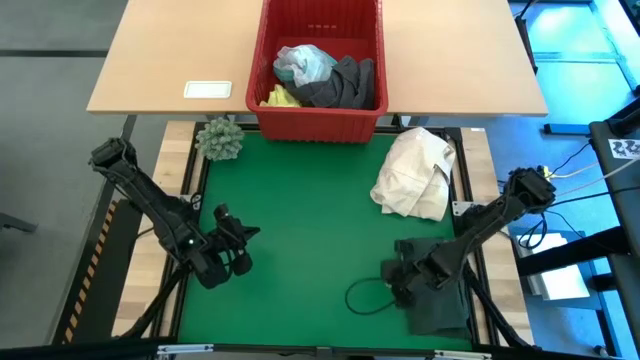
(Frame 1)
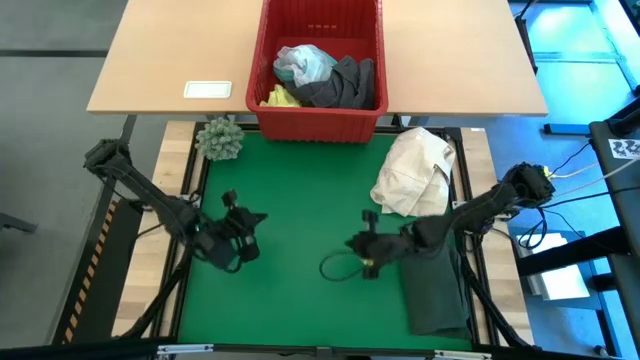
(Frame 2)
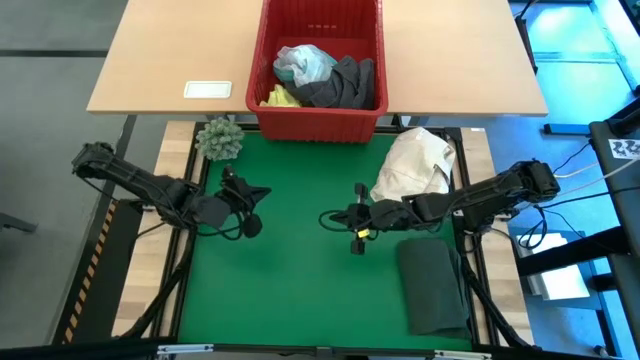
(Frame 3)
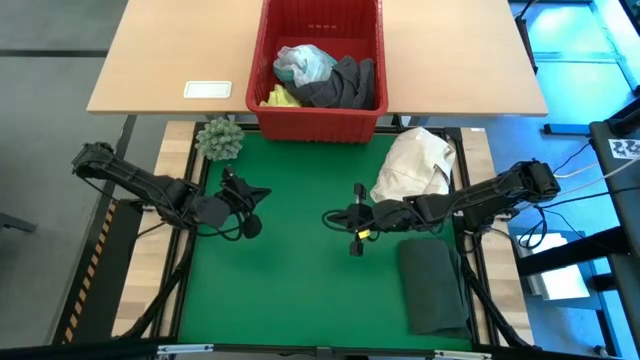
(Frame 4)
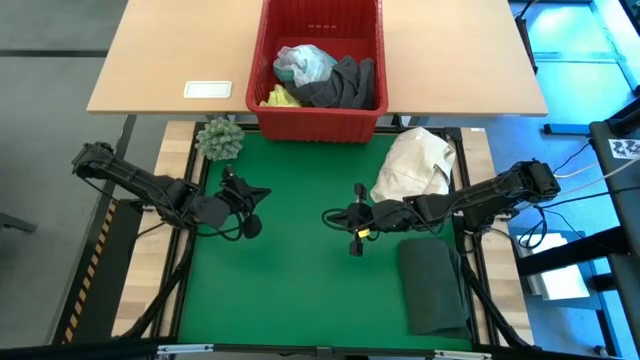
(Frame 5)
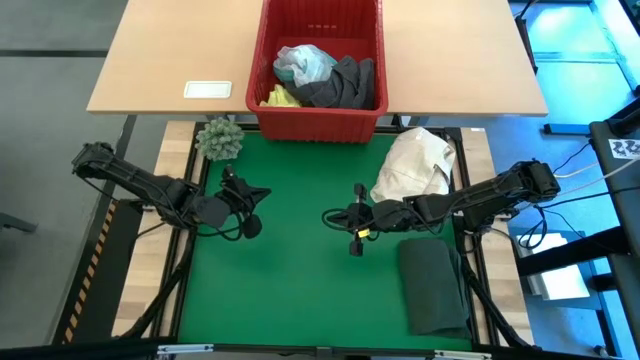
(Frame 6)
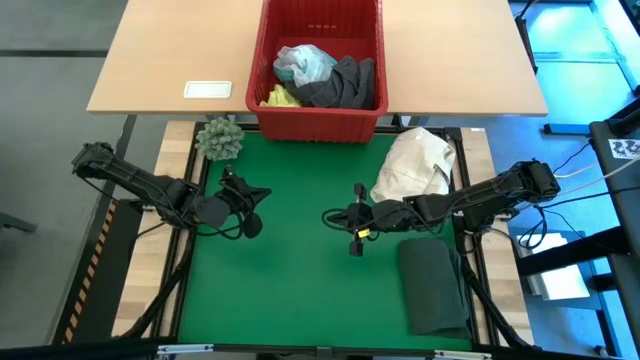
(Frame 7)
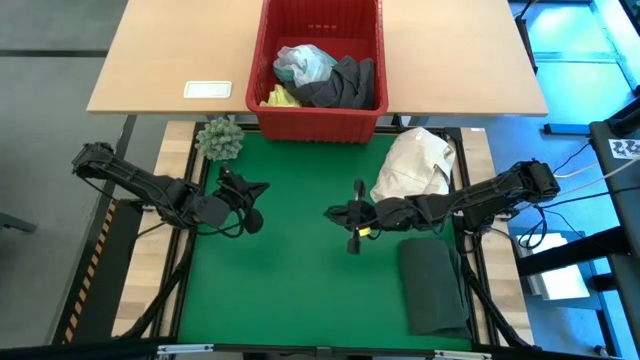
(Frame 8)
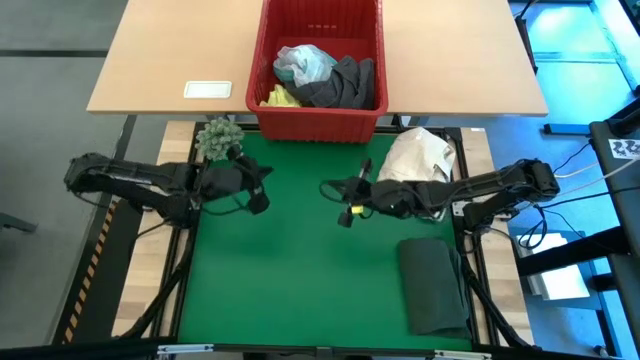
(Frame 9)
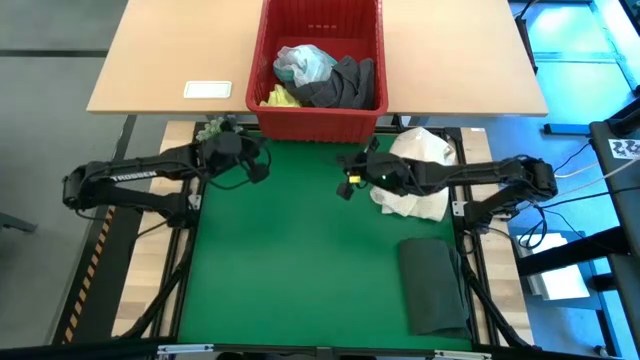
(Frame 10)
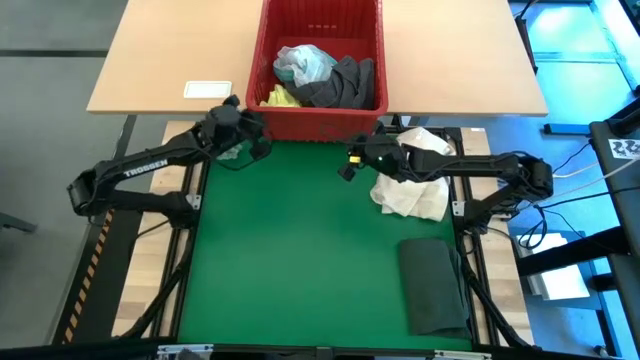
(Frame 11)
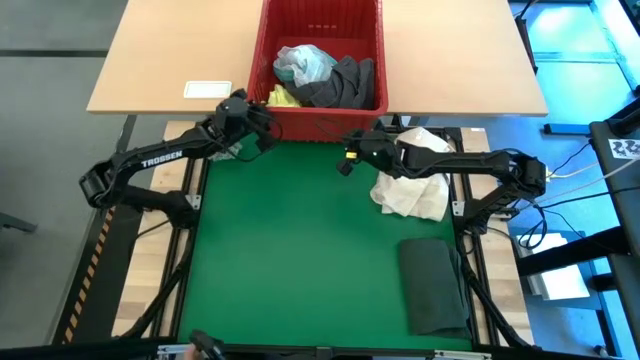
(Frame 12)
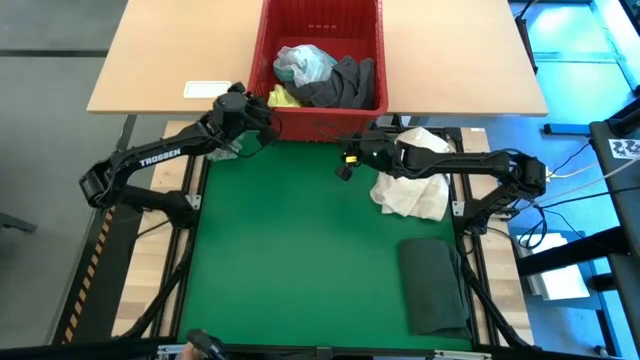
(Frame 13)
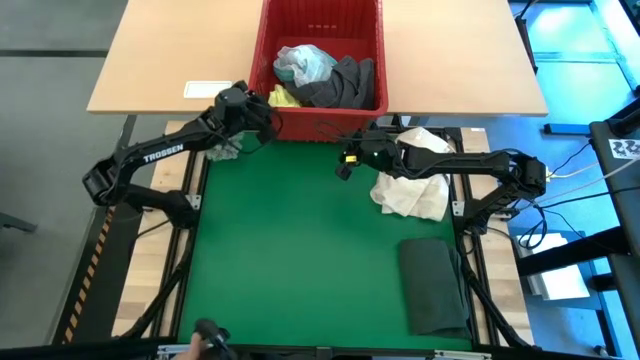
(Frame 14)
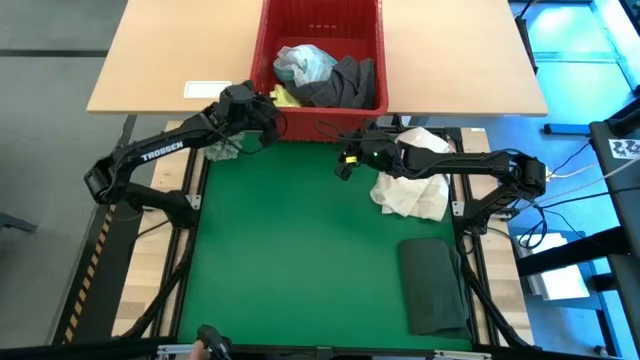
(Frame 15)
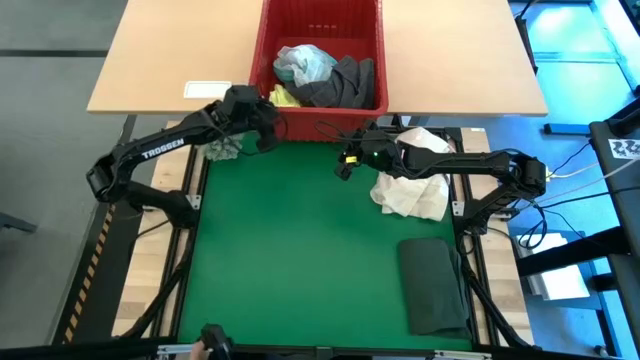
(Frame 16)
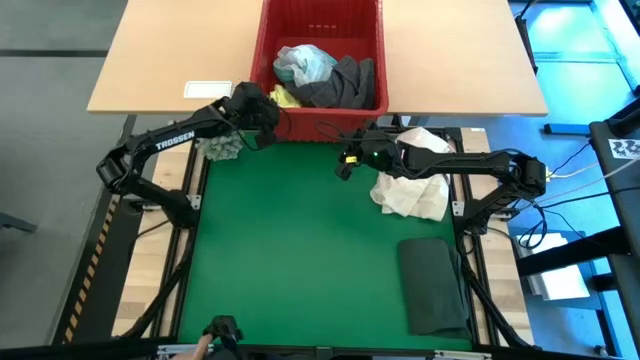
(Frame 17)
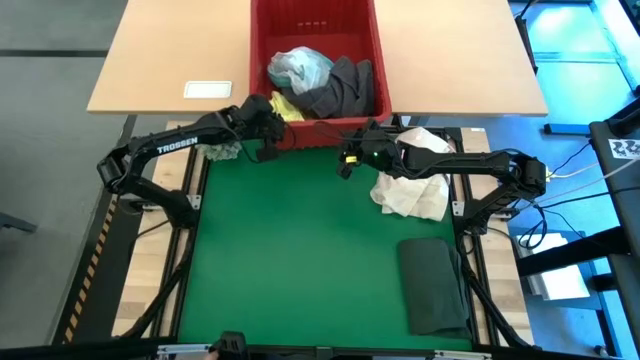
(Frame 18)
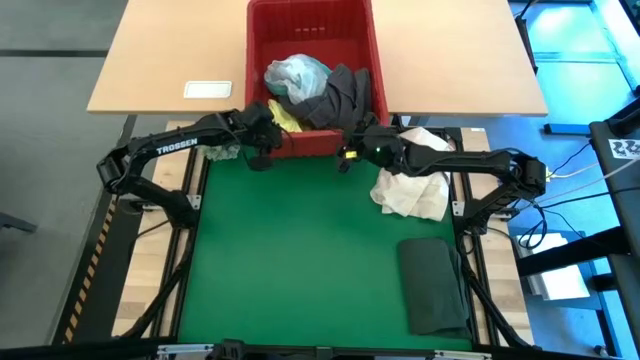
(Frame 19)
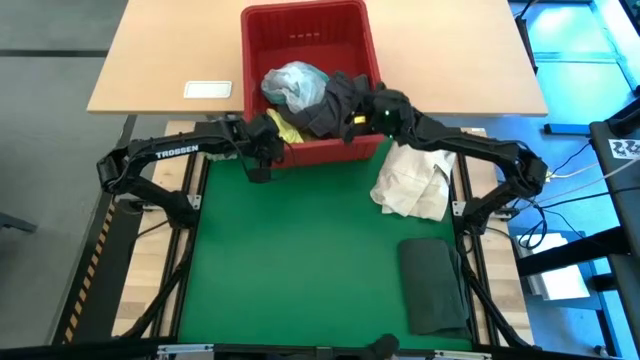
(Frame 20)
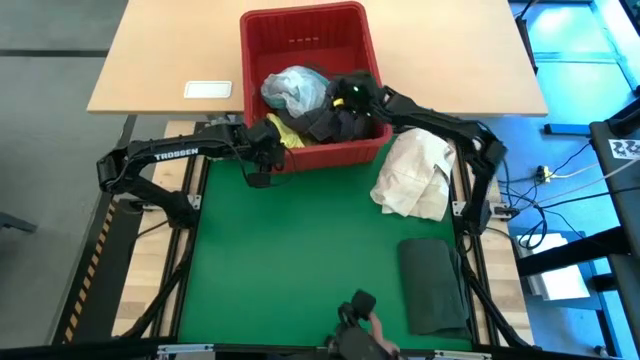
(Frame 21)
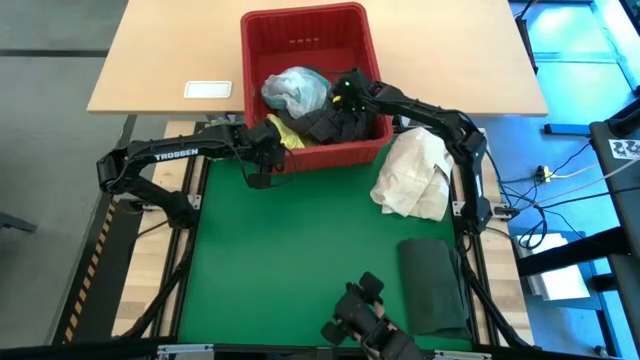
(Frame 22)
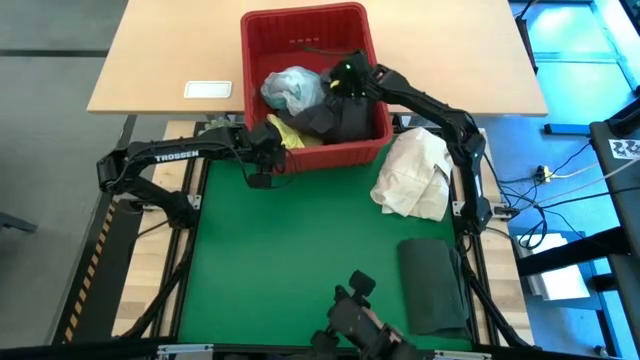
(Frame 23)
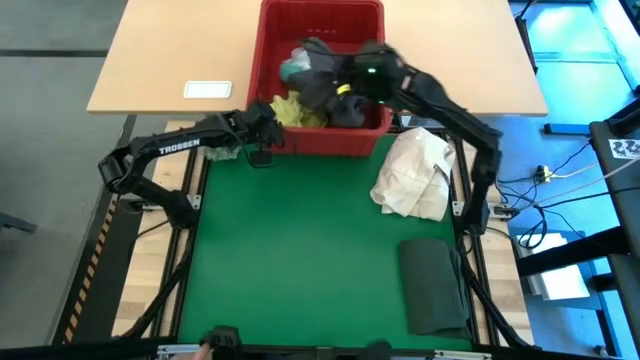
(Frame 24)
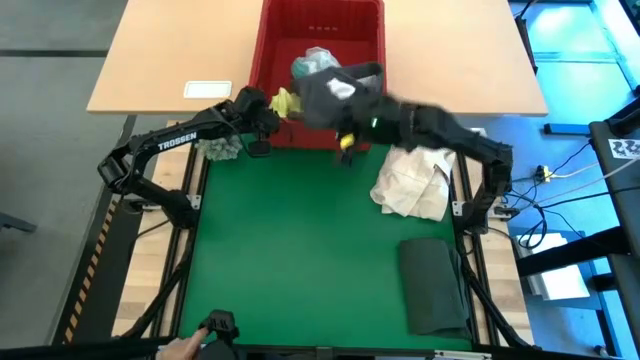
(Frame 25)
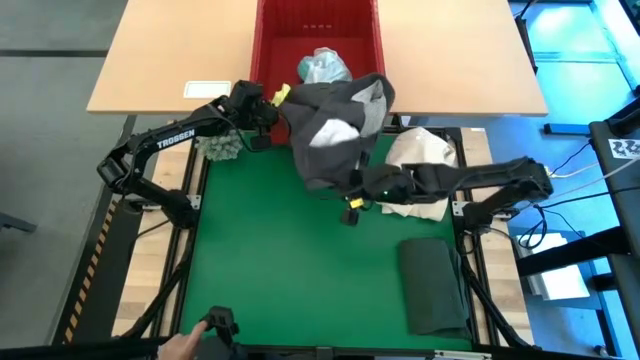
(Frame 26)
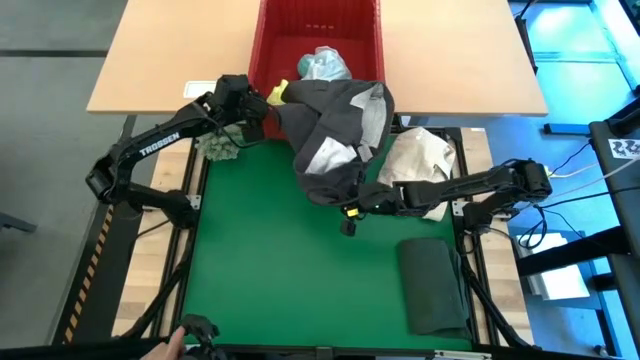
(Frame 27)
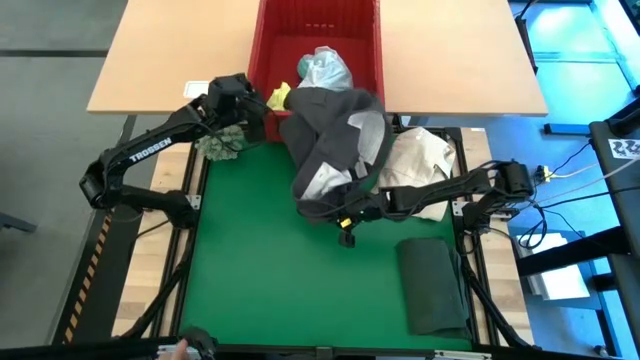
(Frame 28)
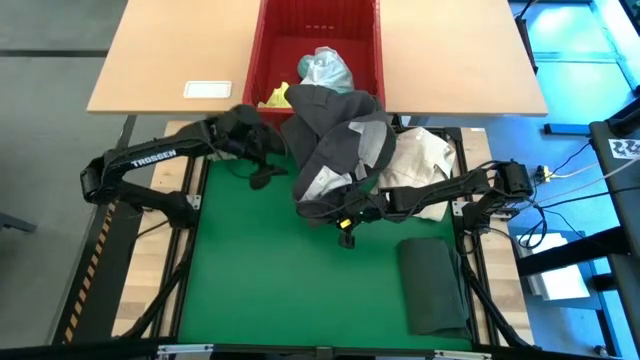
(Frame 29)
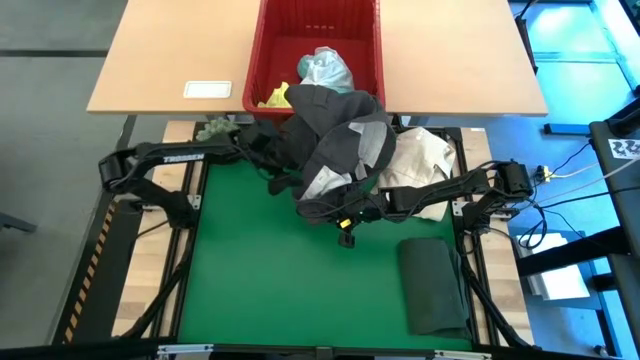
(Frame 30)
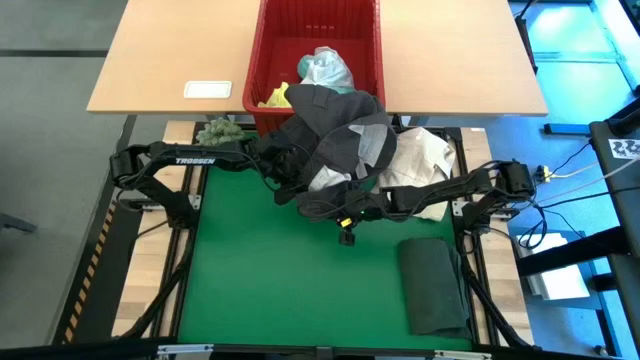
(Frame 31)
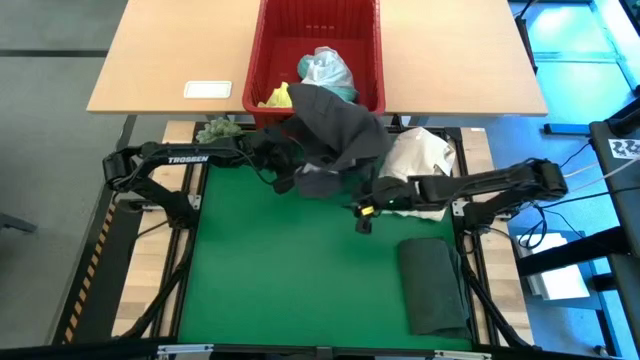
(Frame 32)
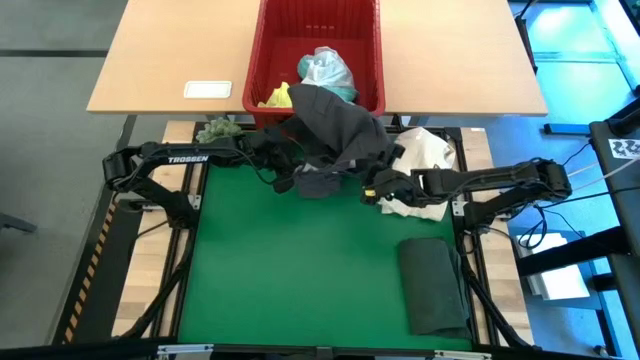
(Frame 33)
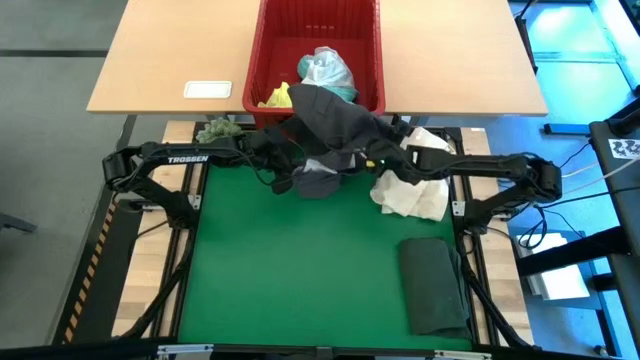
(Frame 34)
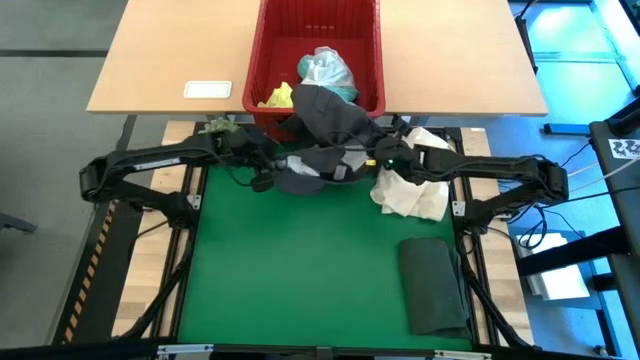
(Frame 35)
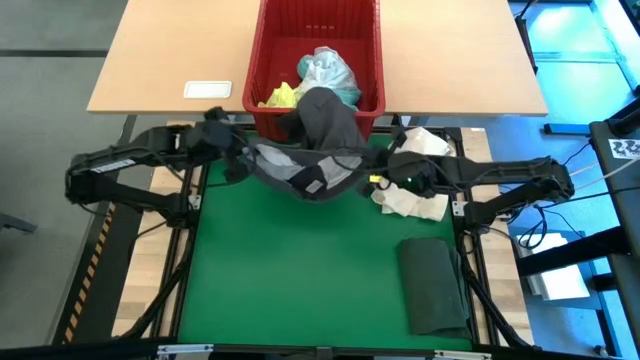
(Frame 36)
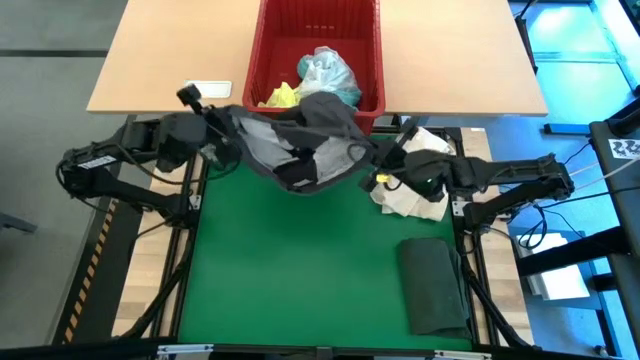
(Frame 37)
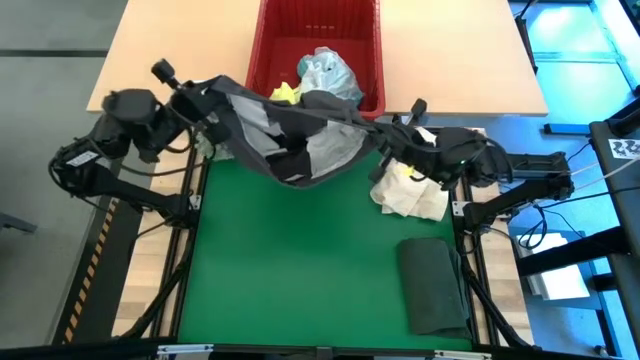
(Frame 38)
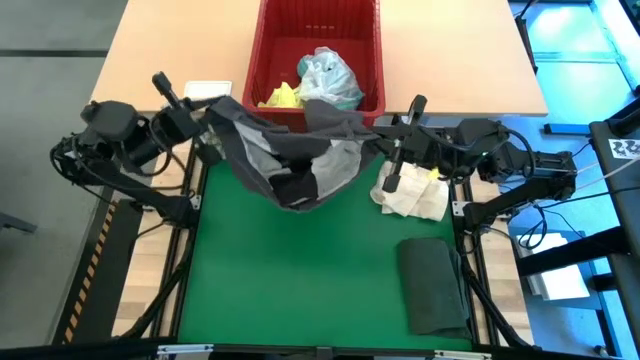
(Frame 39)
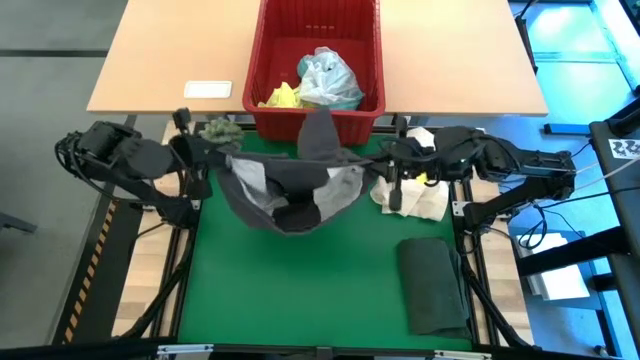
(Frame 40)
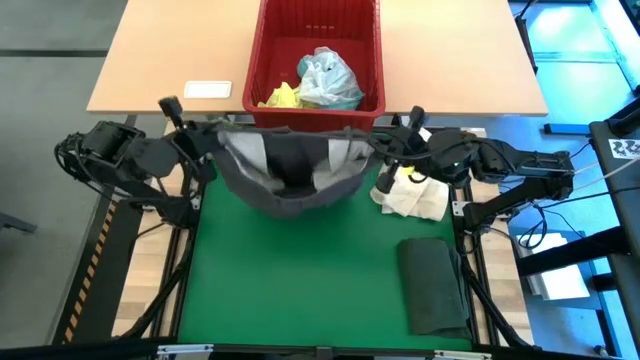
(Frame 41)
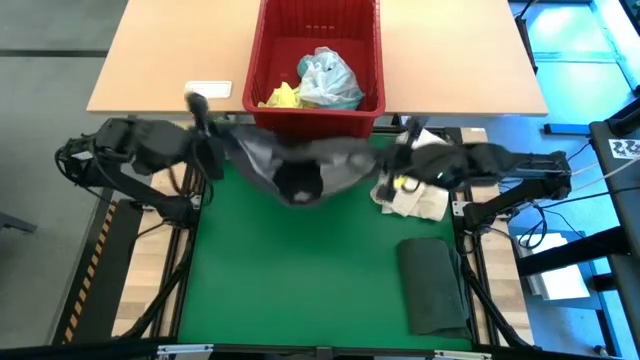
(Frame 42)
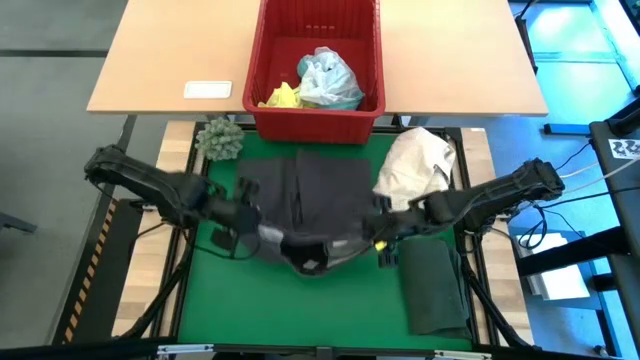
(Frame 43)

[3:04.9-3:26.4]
Task: Fold Laundry from Bin
Fold the gray short
